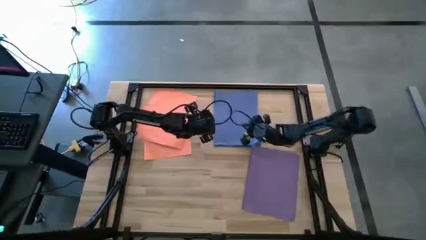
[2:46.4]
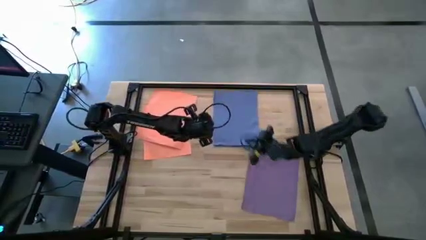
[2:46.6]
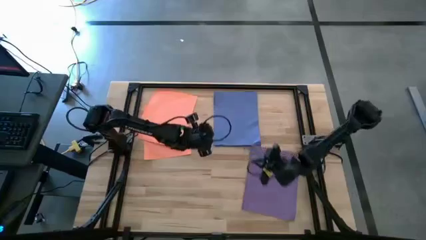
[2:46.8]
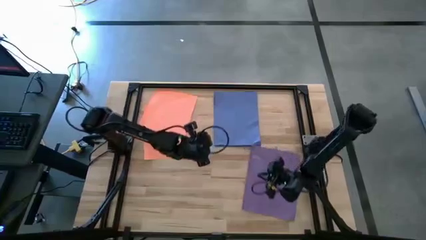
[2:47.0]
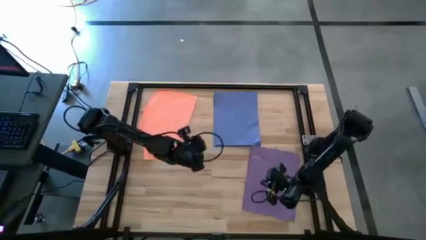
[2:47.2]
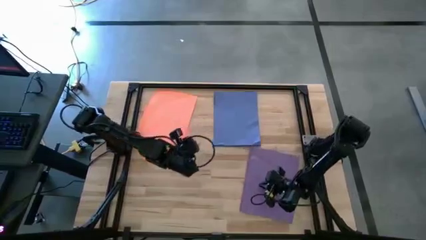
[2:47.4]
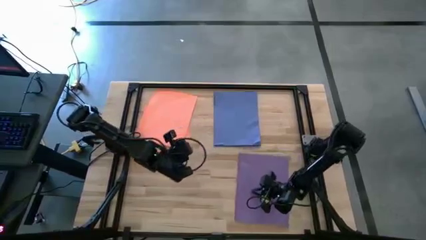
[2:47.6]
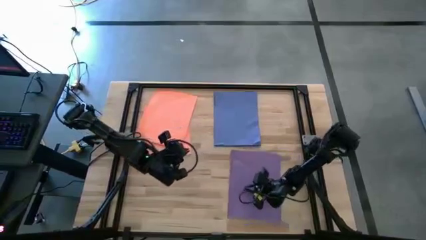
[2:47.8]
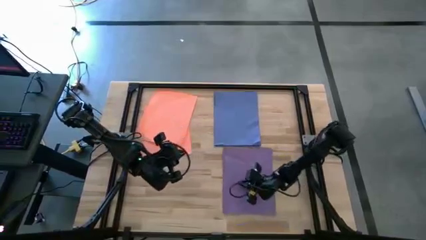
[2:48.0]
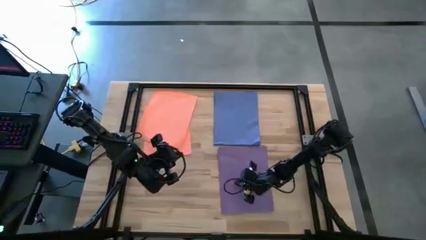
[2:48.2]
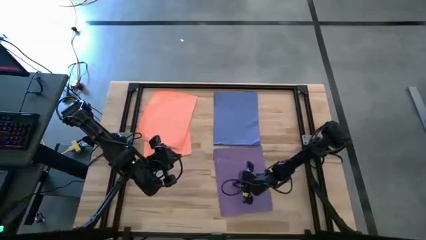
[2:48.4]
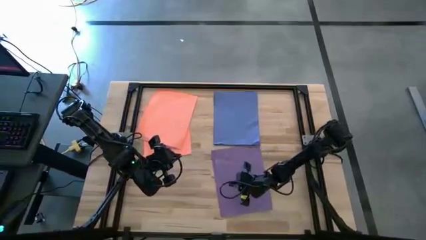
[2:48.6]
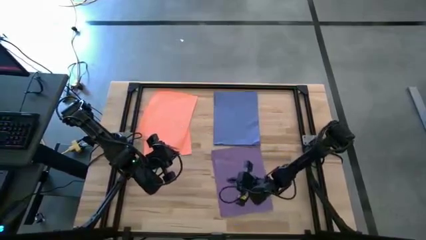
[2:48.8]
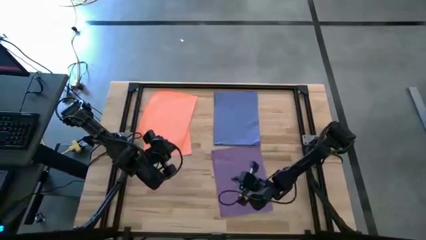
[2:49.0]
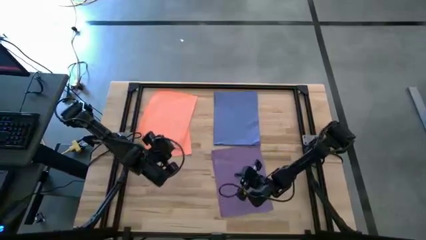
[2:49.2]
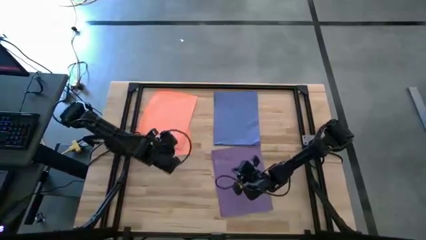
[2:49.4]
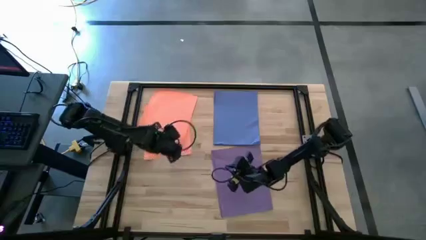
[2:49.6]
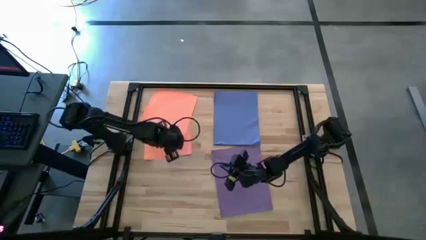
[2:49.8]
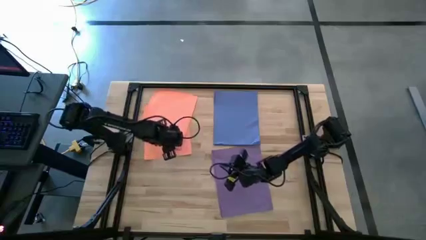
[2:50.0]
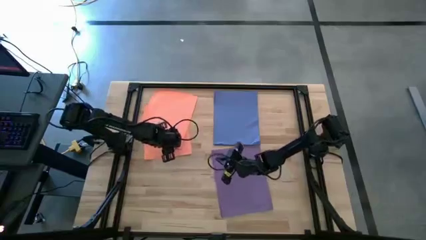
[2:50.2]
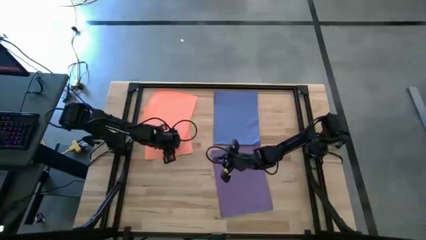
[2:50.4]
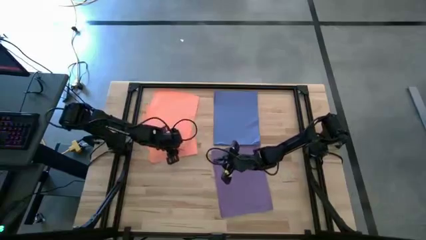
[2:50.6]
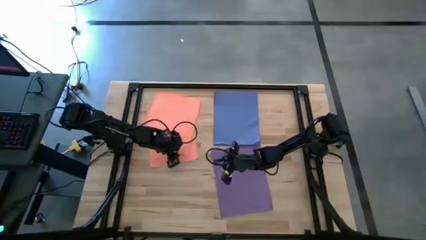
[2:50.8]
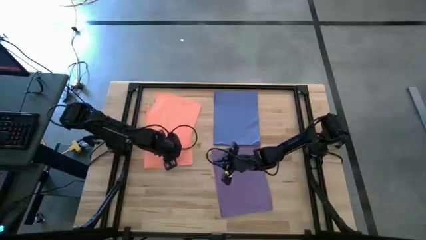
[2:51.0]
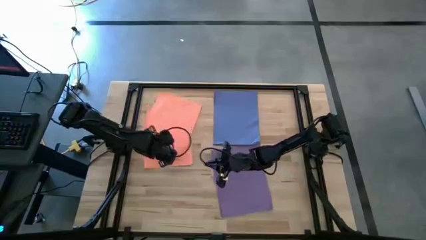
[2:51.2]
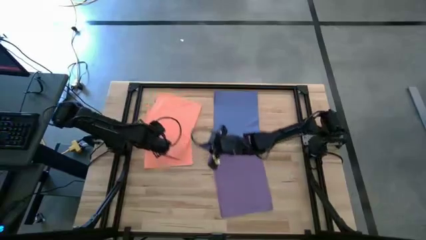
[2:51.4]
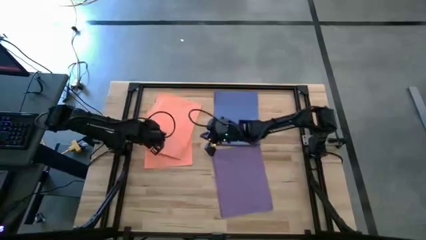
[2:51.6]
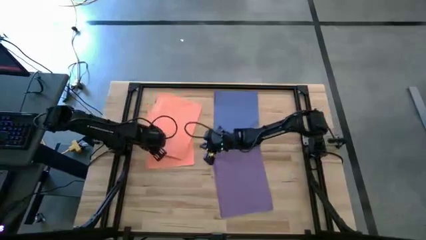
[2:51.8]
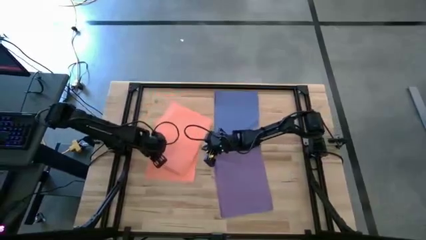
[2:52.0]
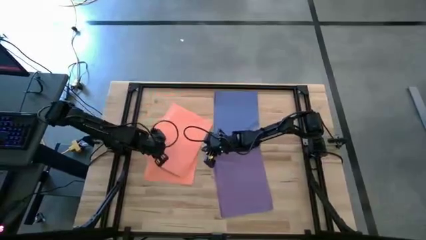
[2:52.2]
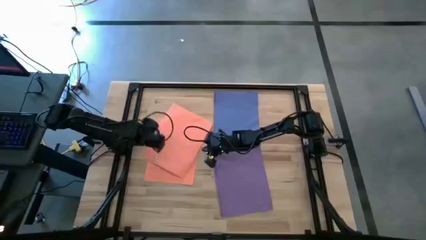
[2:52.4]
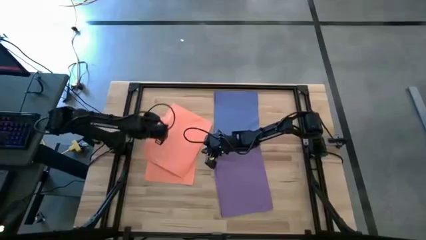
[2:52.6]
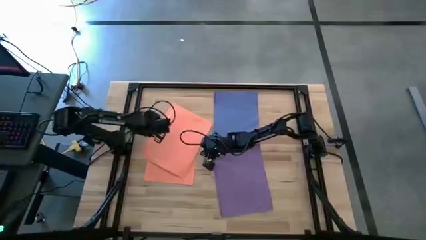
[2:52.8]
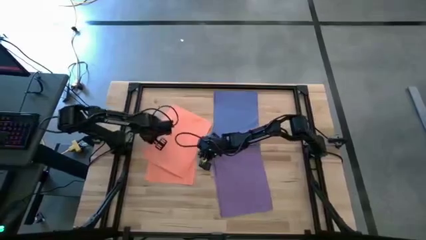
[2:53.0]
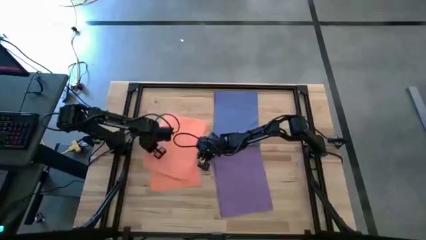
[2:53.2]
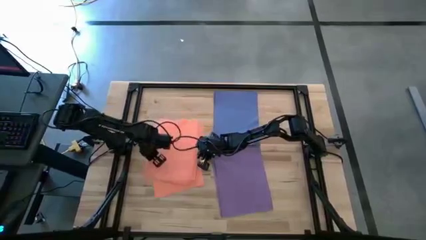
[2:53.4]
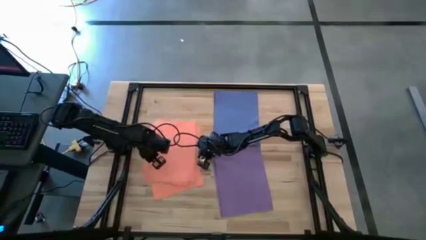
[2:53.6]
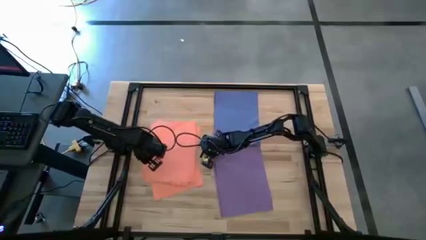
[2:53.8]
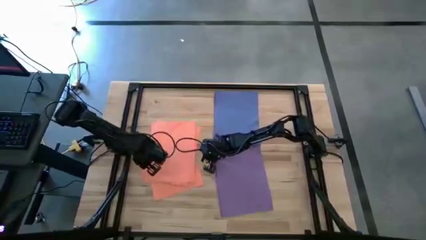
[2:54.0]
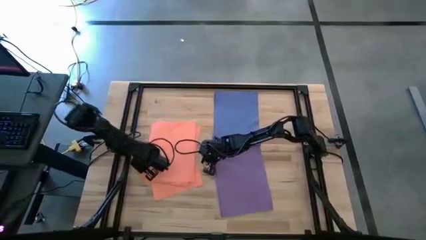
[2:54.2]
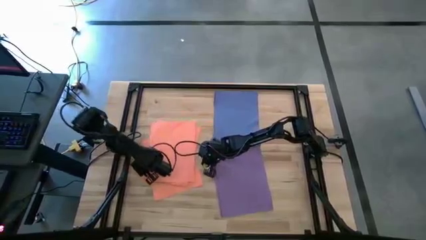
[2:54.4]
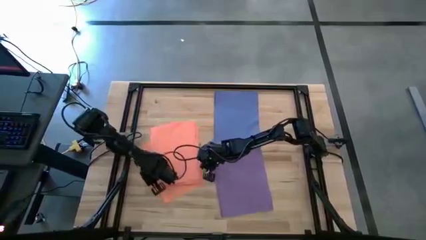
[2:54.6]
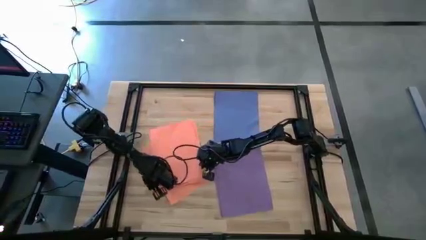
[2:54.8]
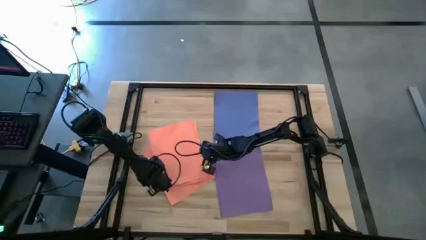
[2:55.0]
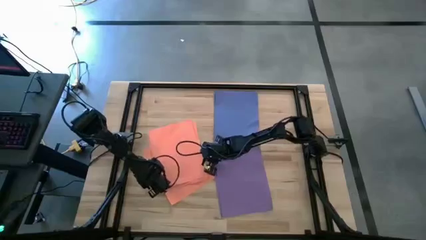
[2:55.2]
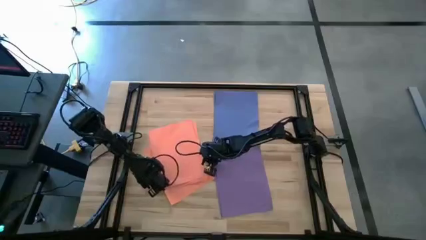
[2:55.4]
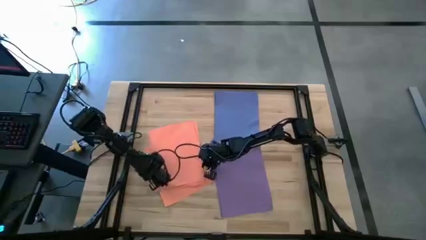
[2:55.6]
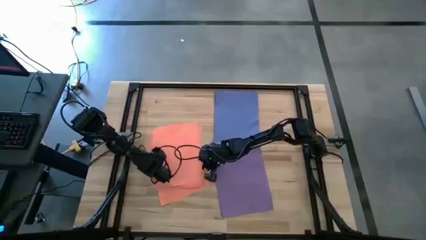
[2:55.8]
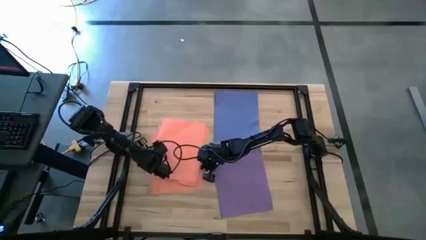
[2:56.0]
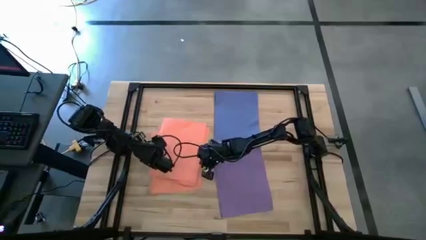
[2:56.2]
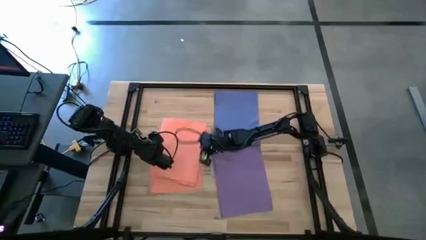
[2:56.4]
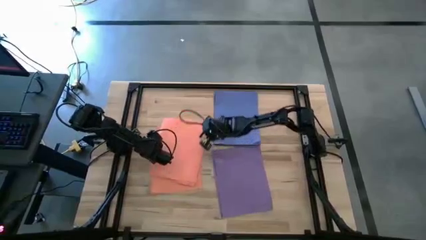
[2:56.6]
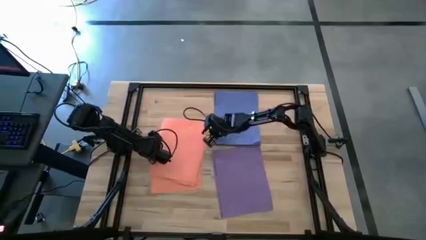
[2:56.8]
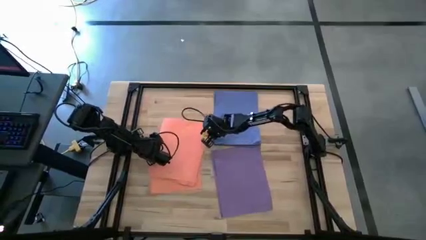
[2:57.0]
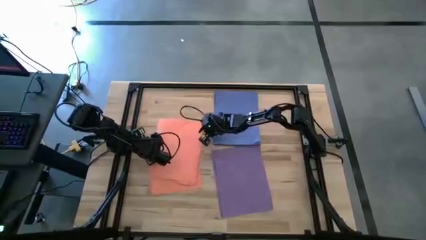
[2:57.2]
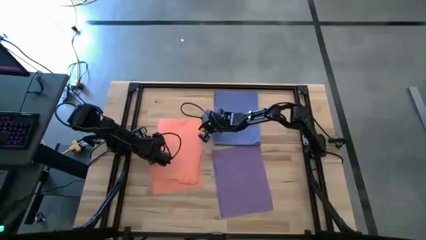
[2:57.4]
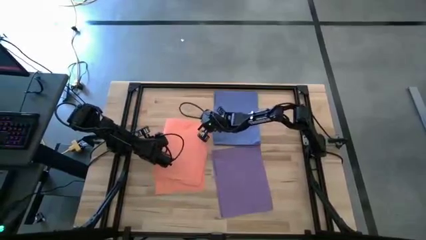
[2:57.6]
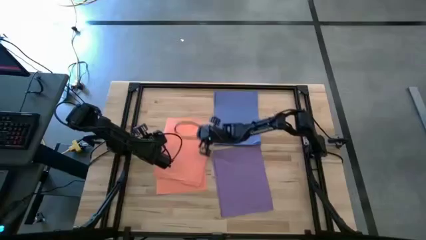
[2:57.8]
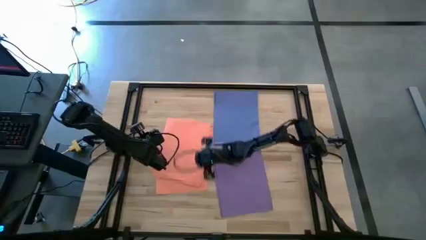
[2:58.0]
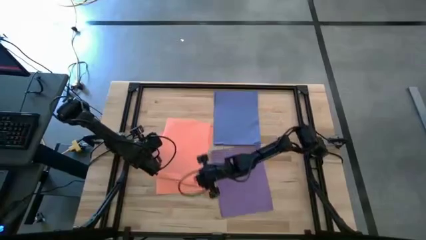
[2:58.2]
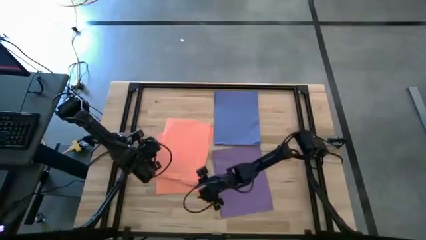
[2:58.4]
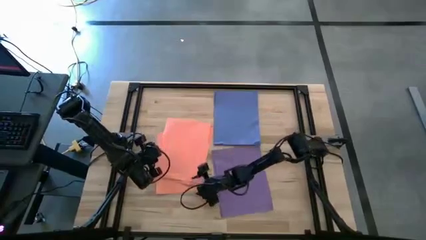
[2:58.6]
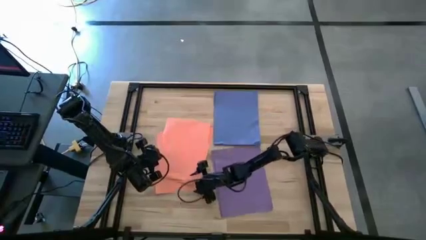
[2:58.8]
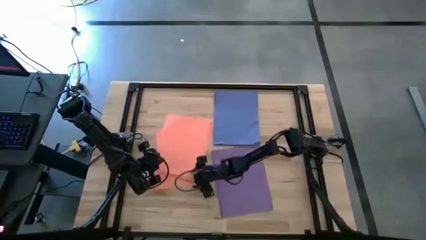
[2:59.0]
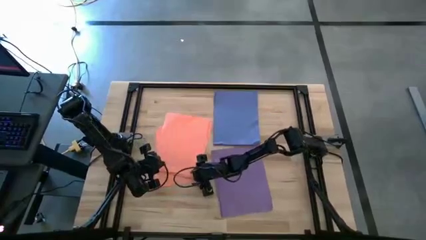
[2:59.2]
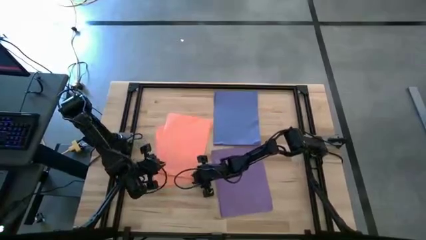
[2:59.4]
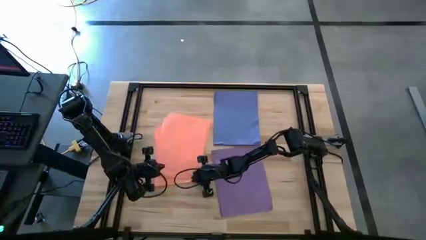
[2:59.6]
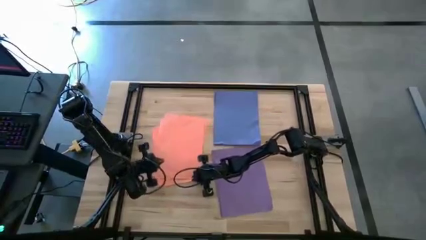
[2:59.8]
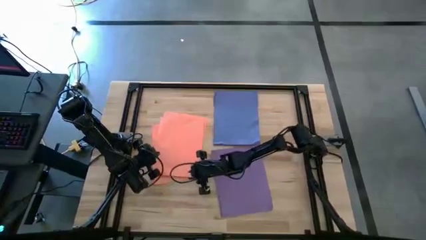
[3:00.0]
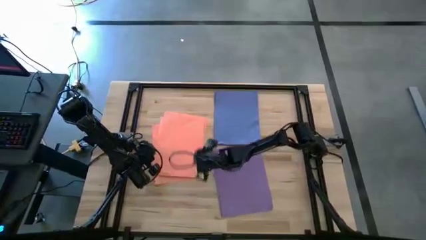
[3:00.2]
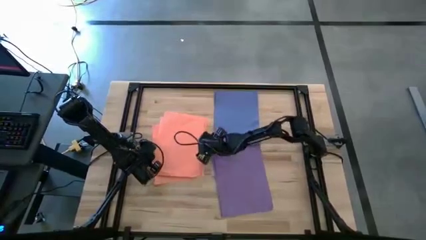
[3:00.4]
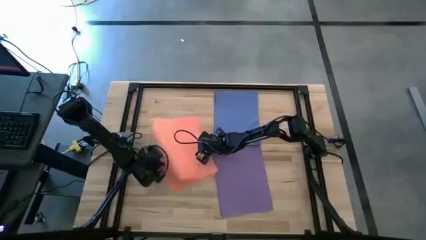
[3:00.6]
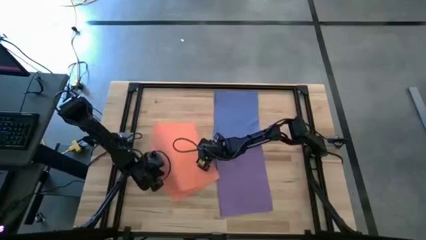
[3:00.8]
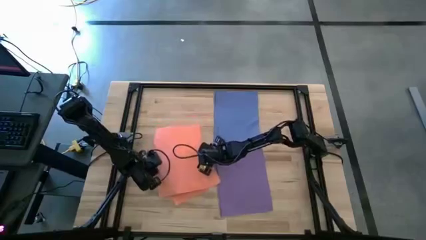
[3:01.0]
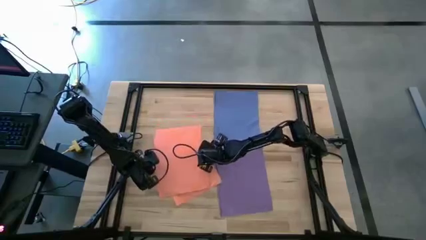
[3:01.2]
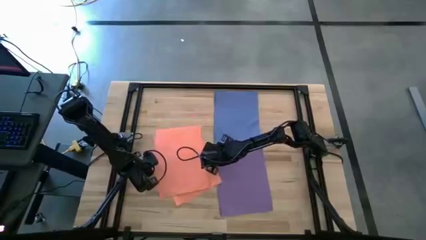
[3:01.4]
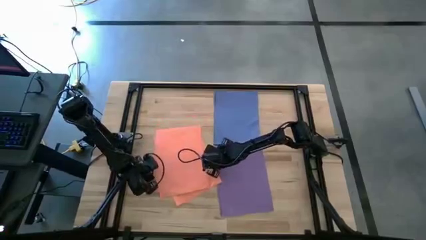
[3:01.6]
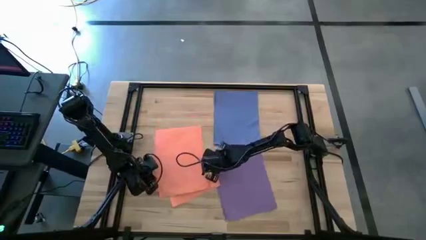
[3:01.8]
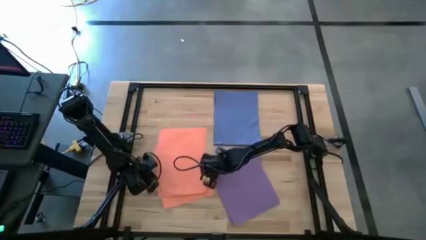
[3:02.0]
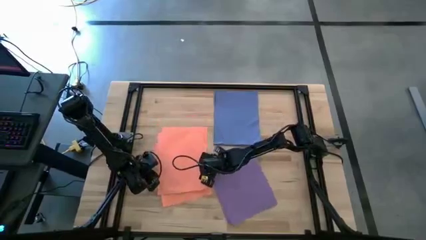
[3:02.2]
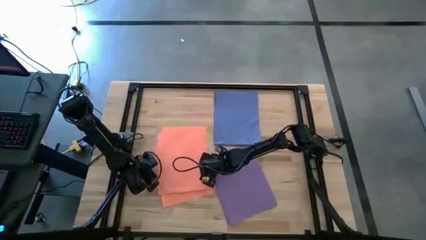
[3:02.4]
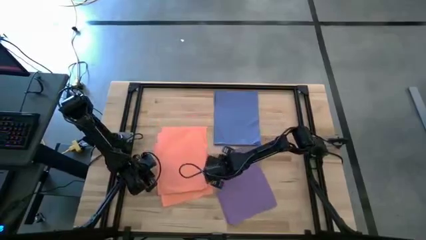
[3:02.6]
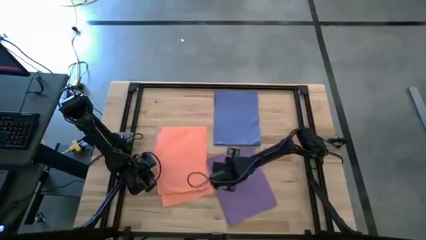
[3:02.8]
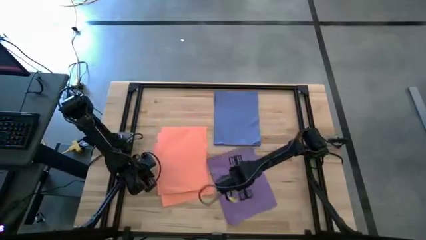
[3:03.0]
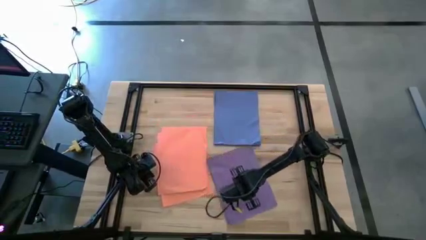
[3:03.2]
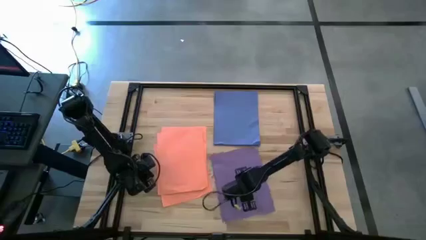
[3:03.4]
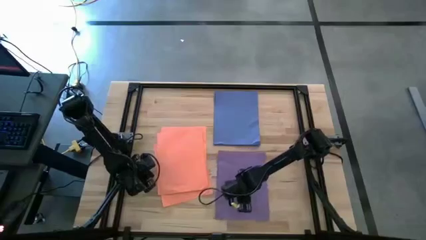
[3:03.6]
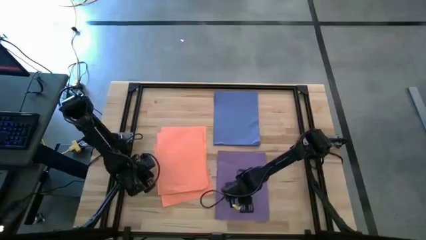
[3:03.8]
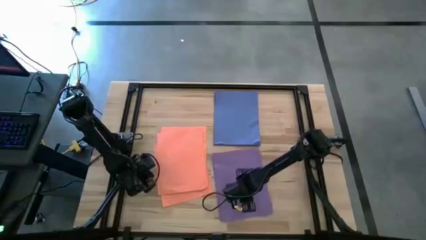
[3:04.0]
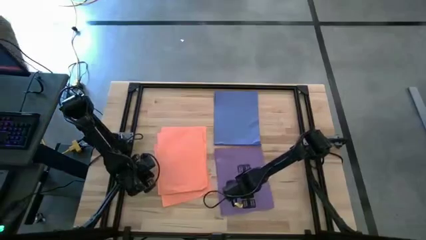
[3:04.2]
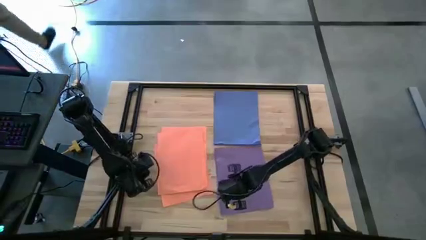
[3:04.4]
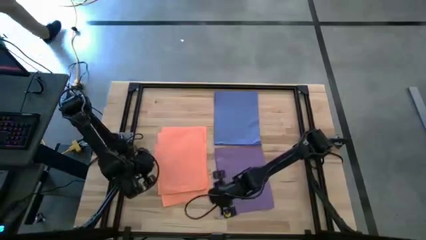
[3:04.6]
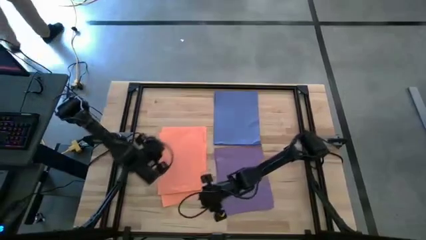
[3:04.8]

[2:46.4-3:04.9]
Task: Organize paper
Adjust the stacked colored papers on the table
